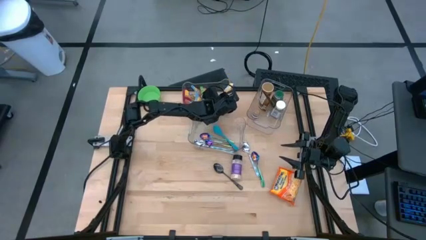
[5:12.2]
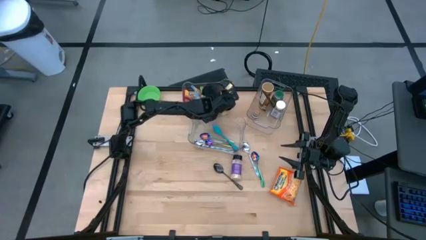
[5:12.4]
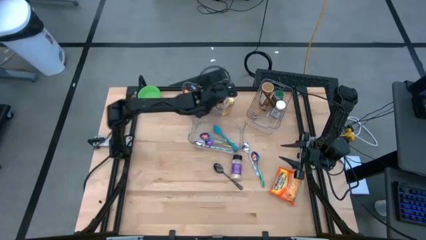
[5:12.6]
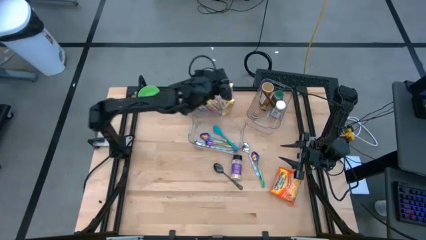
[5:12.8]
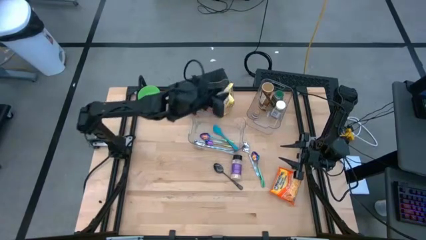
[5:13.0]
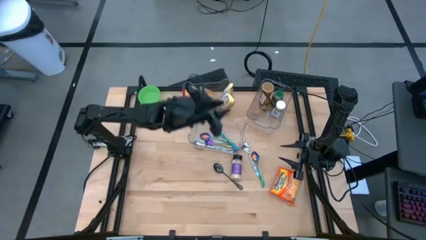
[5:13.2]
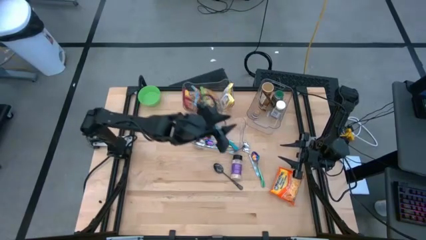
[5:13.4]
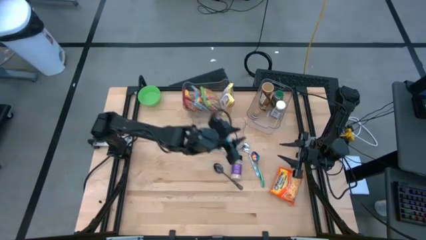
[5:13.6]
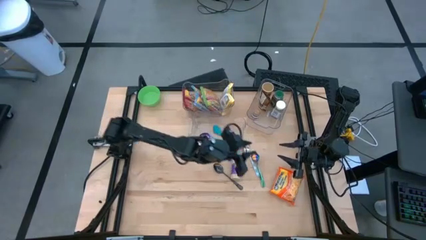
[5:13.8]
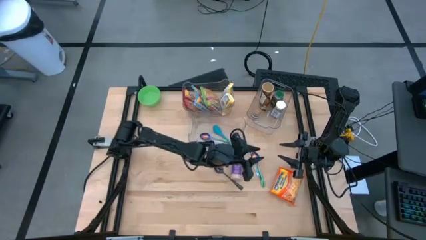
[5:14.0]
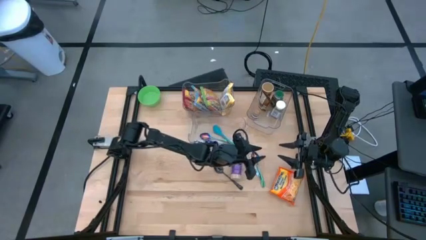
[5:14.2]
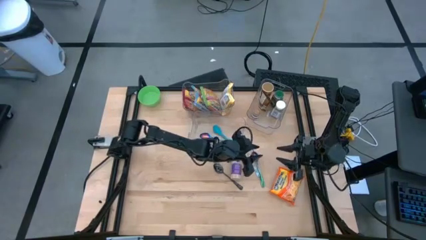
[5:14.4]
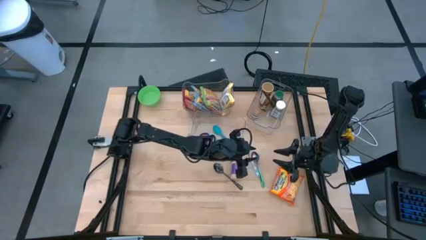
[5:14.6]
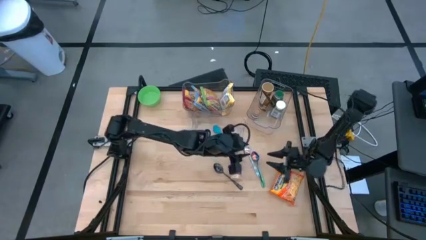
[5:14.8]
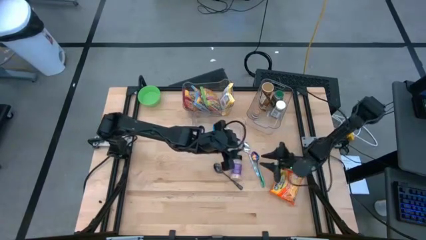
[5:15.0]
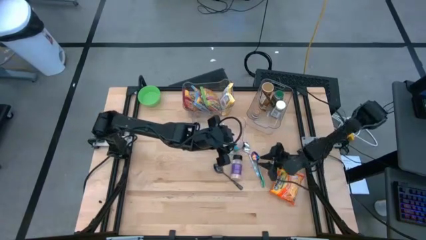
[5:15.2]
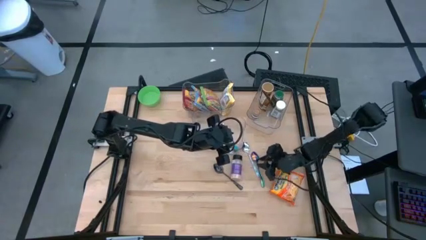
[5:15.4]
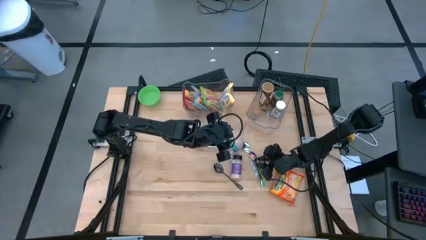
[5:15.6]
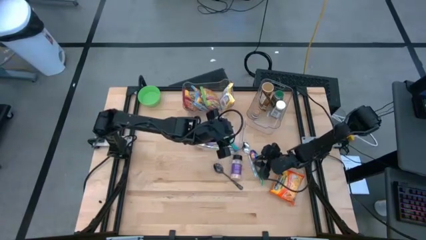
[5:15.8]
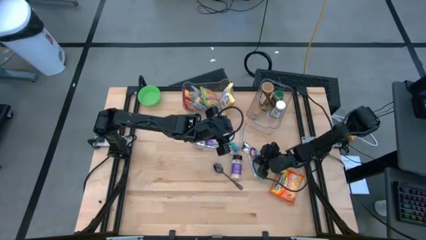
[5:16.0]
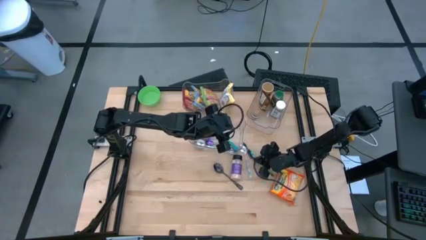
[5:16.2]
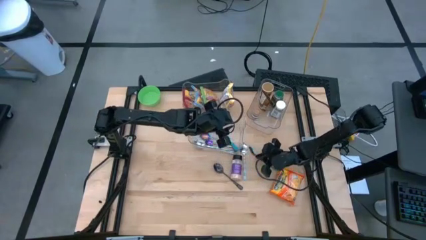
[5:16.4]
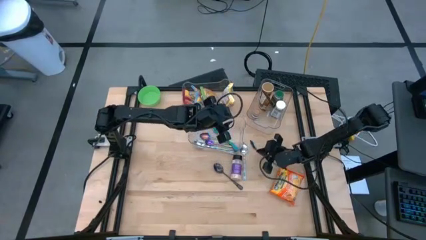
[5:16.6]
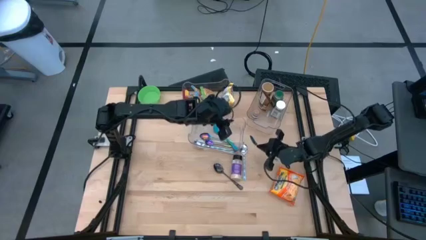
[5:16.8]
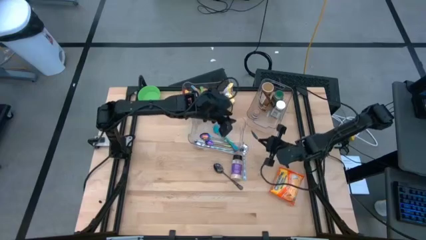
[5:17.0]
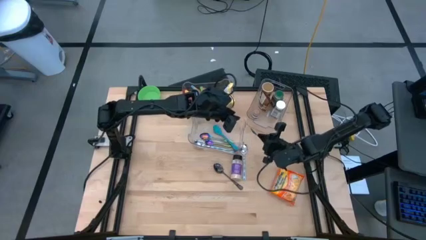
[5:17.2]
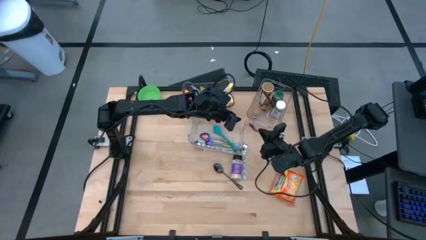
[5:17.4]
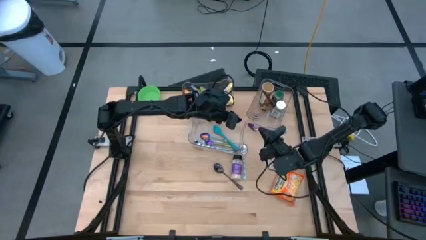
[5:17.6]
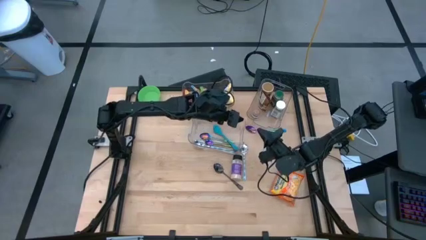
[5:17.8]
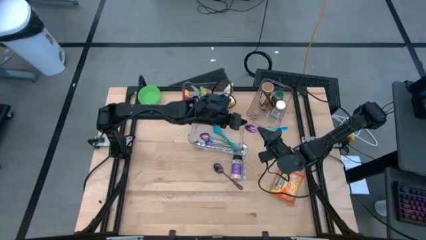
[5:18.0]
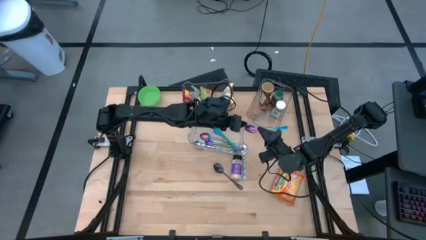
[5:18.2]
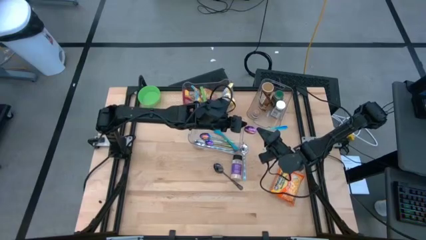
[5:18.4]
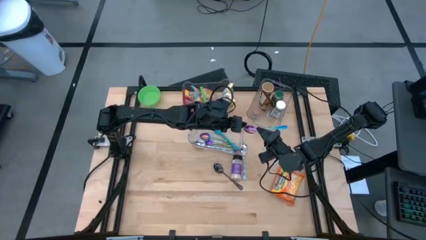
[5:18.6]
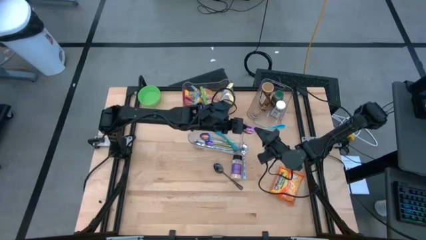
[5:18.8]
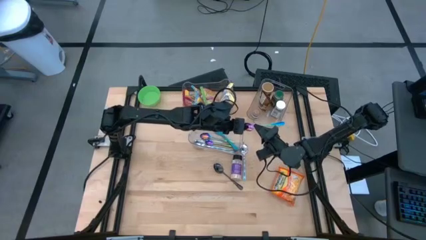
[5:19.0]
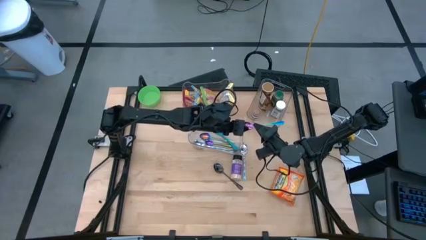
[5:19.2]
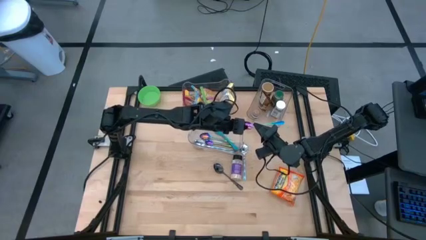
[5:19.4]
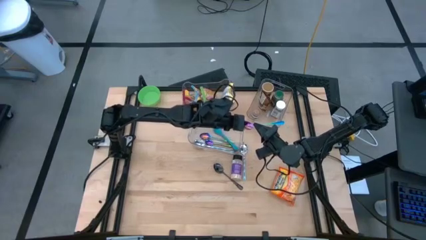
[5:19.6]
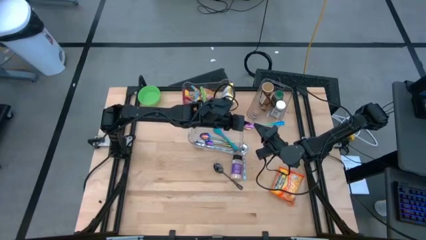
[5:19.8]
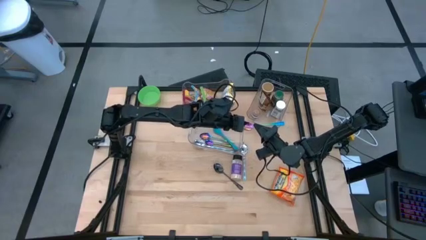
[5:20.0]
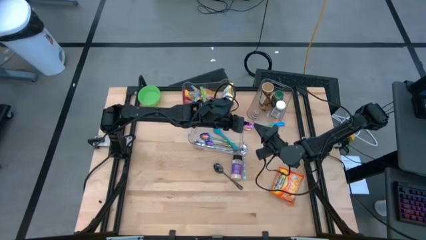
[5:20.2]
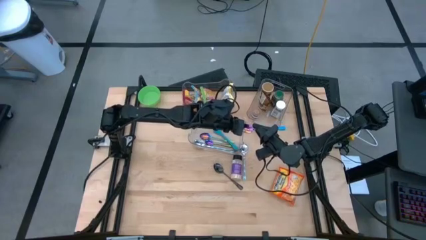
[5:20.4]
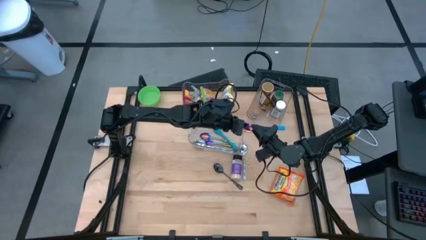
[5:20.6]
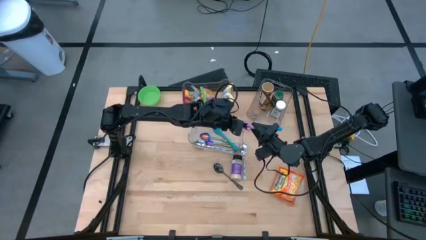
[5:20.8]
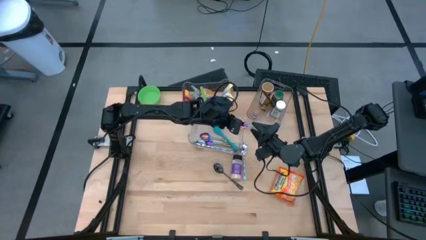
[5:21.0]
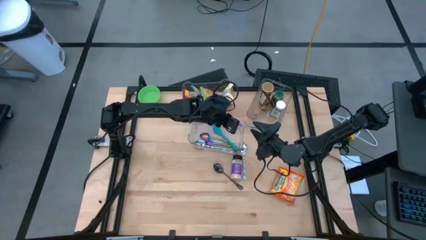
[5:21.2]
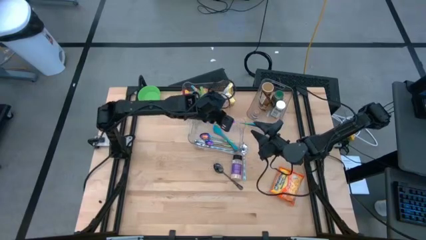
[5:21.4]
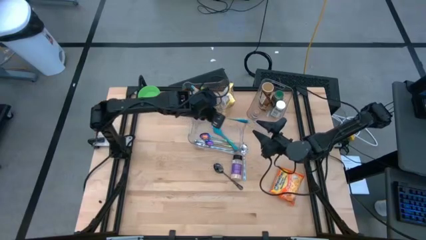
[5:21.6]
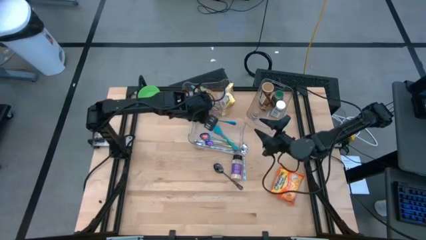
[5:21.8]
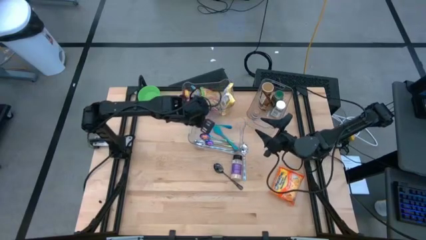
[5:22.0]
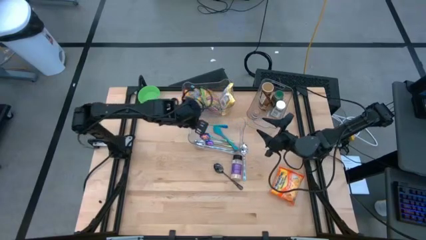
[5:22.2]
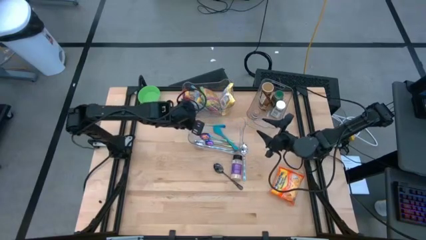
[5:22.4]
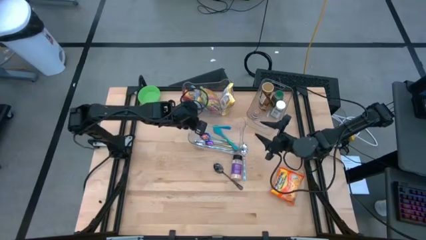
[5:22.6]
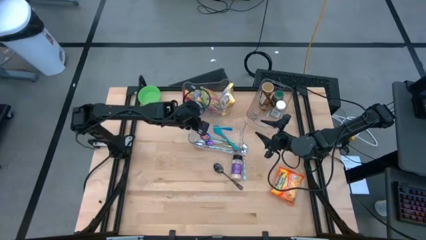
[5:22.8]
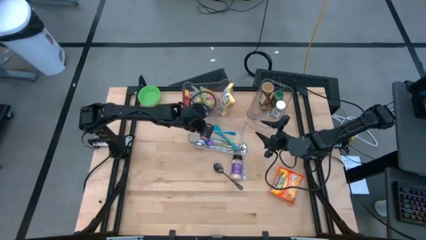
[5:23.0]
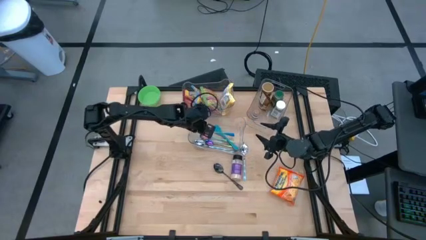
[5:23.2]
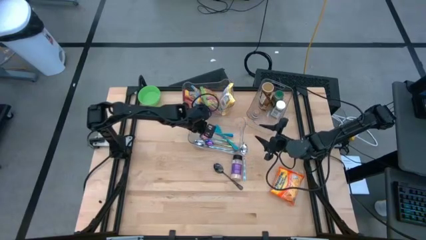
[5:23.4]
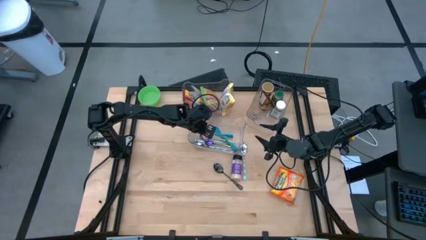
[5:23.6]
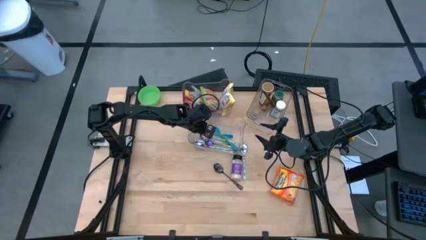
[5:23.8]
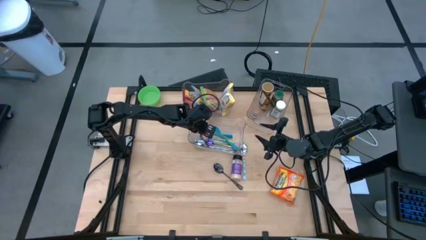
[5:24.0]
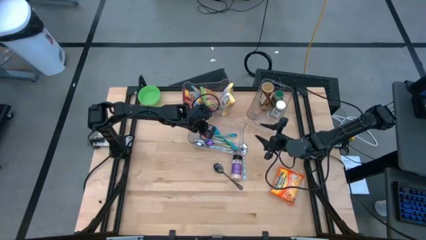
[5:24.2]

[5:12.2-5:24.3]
Task: Pick & Place Food Item
Put the green spoon into the bottom transparent bin
